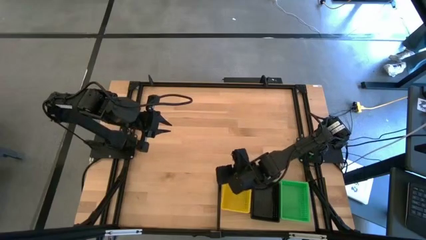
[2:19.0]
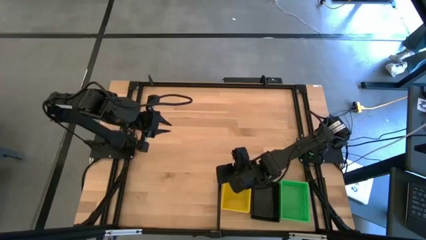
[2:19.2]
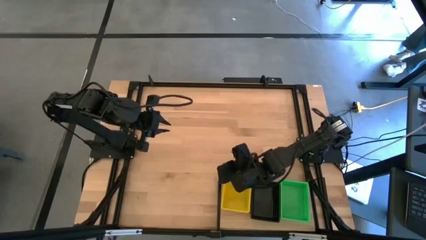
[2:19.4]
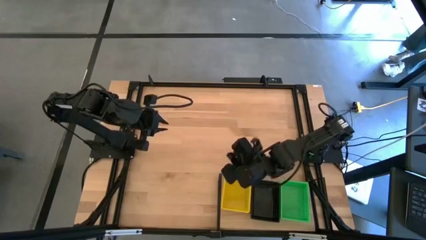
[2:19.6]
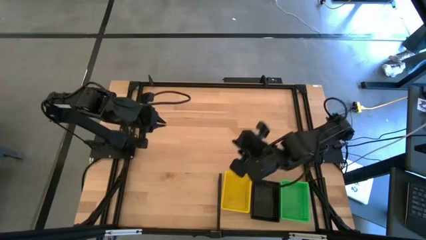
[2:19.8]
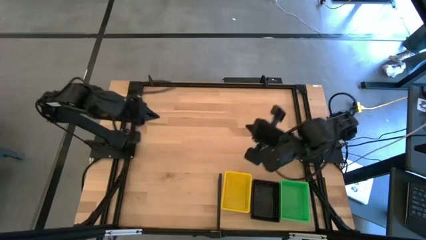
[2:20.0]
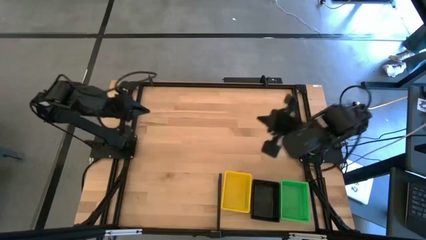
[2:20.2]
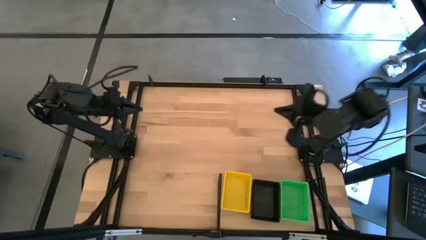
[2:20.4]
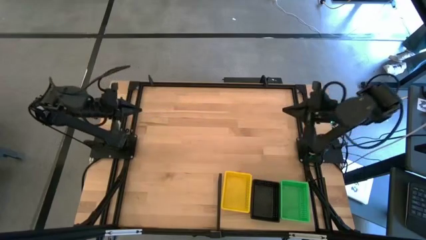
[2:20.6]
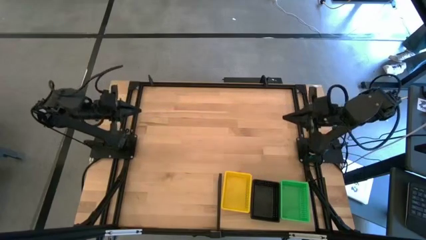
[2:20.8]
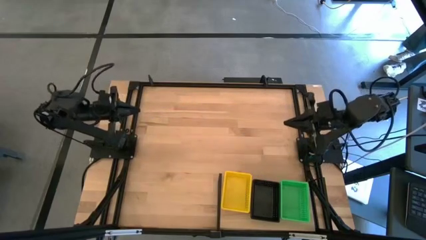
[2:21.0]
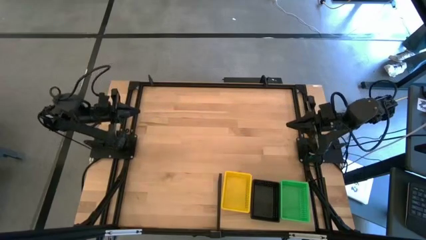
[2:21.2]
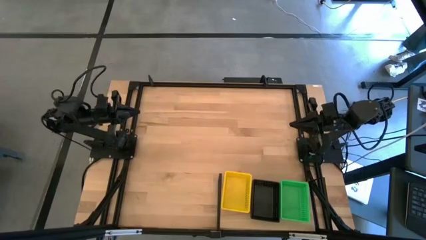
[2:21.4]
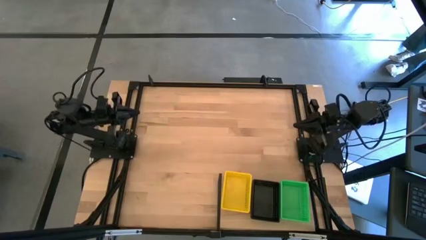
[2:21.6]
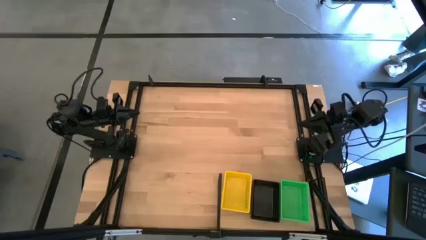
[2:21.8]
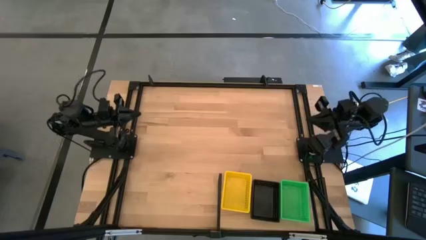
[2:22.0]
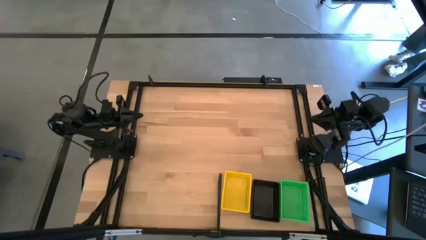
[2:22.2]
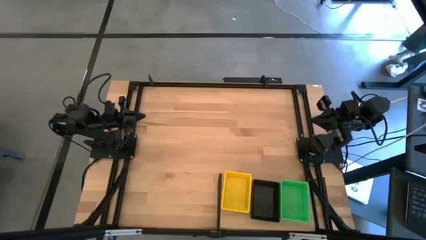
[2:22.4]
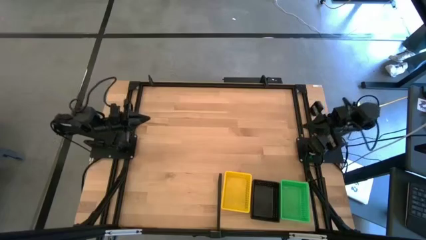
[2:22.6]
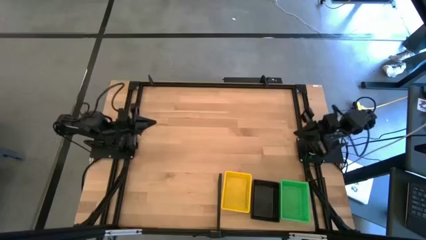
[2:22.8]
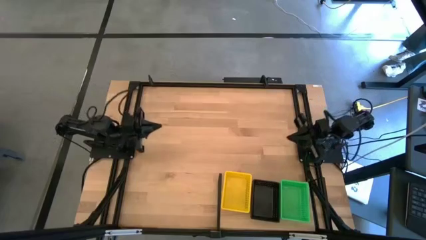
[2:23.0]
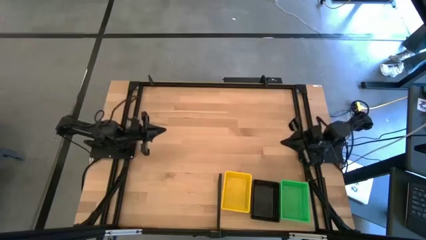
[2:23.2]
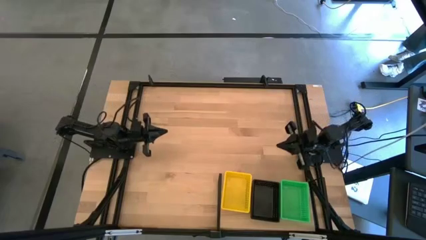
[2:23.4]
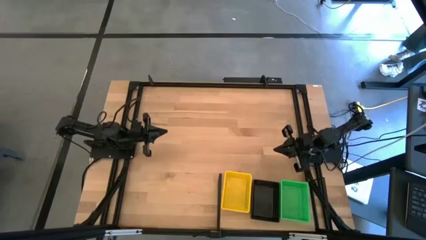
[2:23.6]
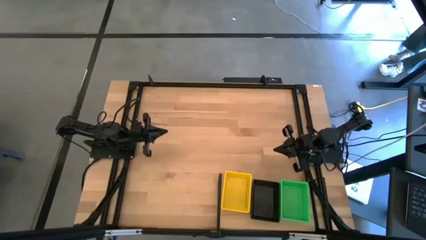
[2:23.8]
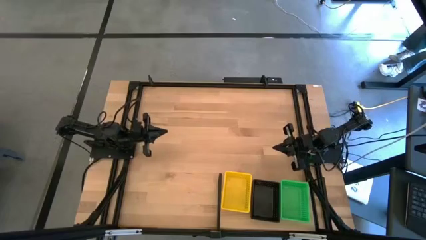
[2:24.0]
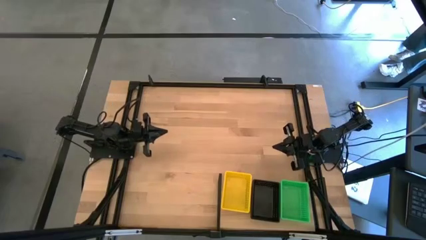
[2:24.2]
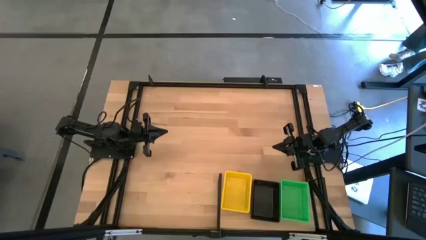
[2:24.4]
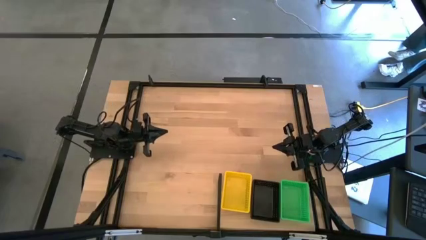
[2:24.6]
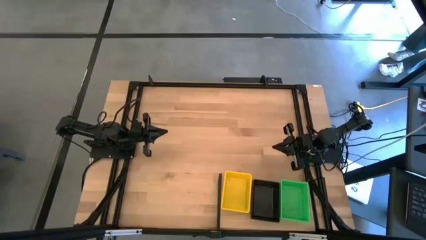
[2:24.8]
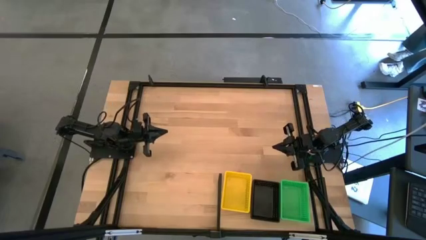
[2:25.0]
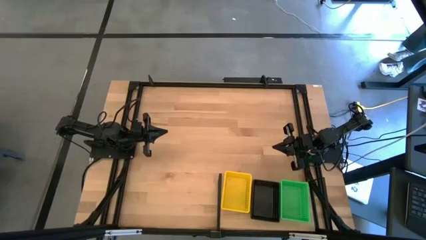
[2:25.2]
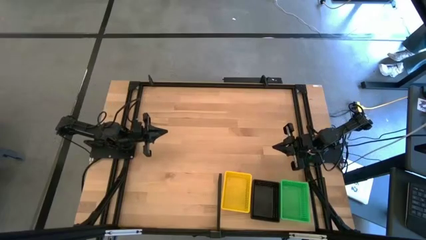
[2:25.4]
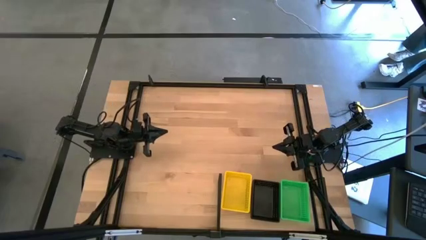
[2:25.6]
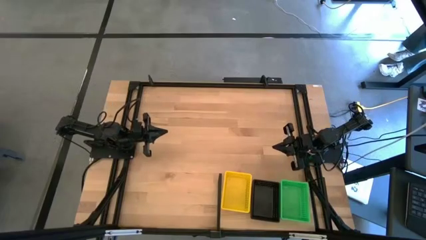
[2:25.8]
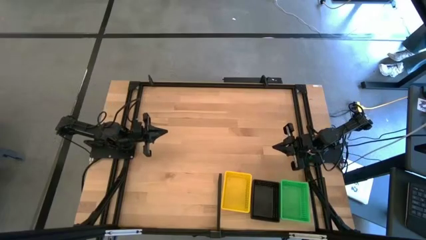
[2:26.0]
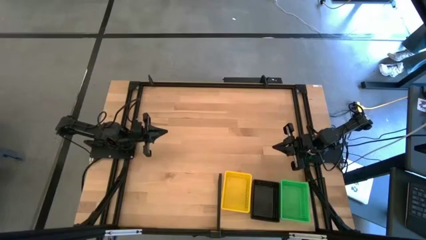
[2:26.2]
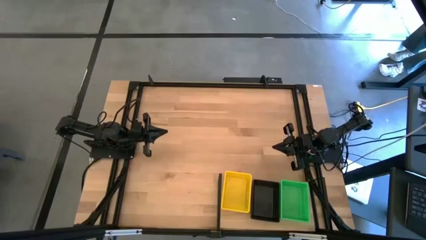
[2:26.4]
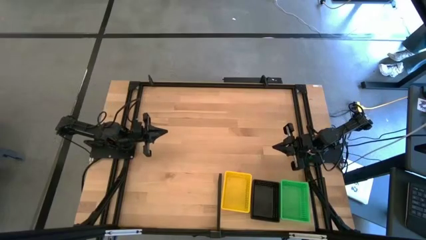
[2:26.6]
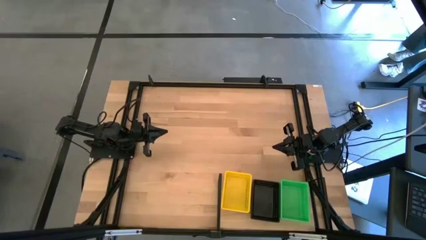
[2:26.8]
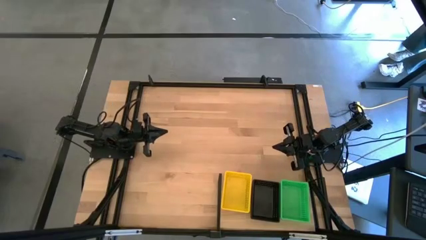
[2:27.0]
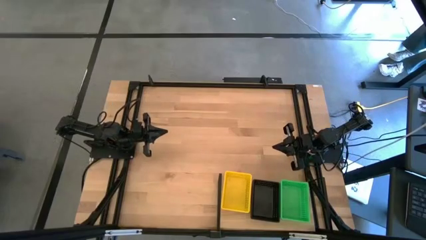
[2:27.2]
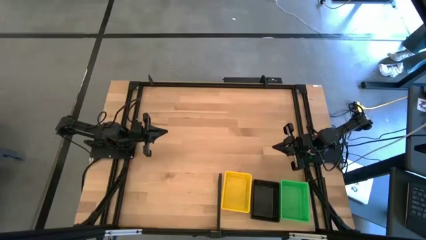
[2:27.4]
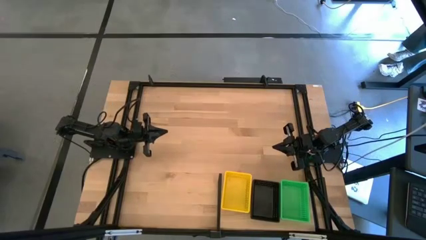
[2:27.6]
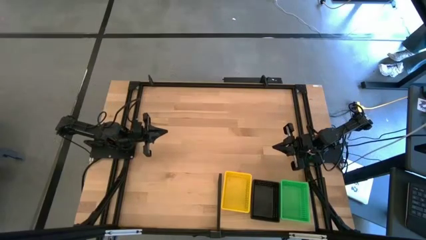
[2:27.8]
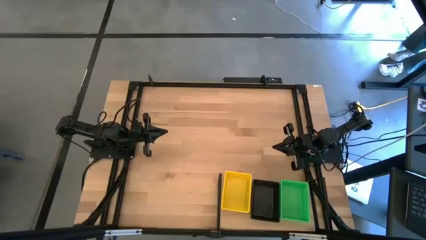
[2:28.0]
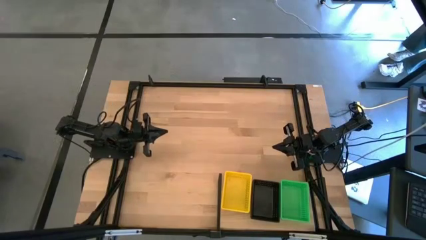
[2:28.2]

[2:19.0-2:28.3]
Task: Stack baskets on shelf by color
Return to Home Position

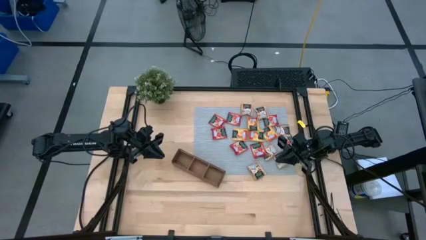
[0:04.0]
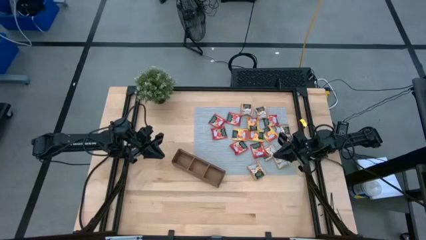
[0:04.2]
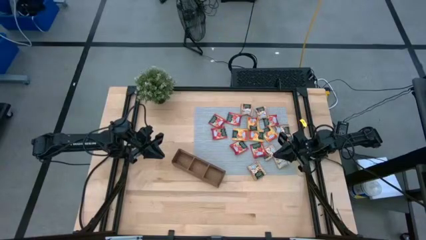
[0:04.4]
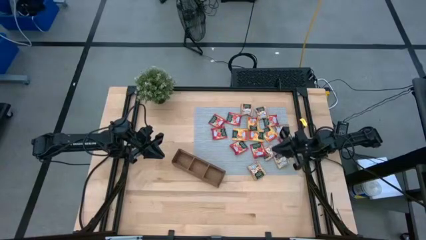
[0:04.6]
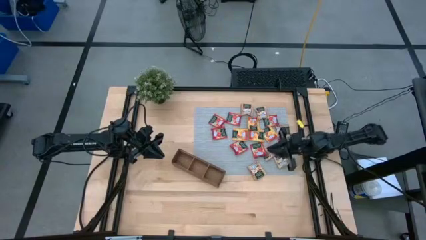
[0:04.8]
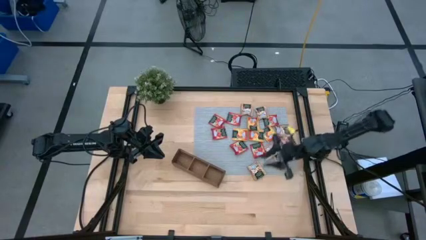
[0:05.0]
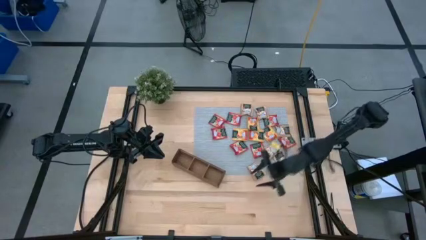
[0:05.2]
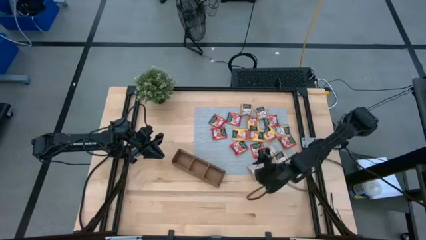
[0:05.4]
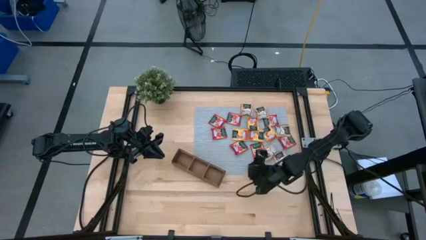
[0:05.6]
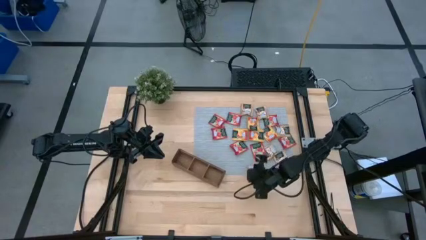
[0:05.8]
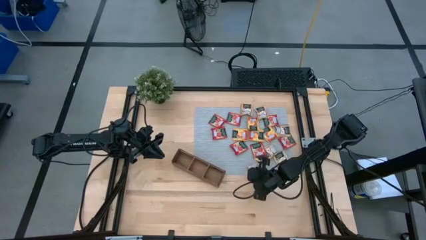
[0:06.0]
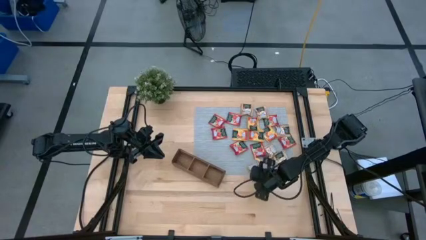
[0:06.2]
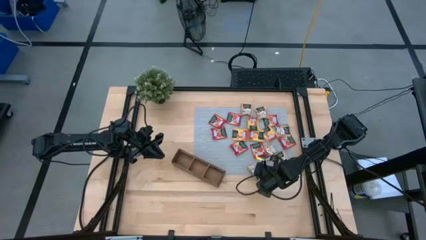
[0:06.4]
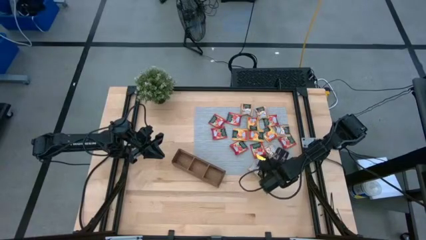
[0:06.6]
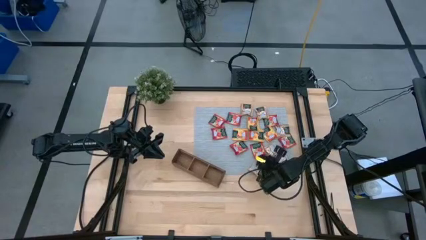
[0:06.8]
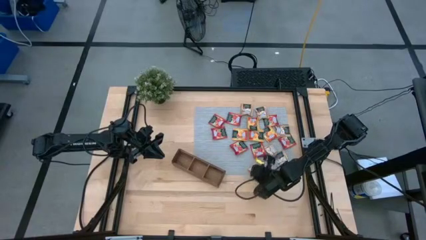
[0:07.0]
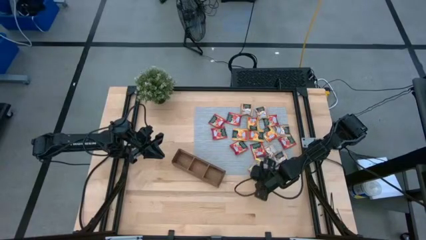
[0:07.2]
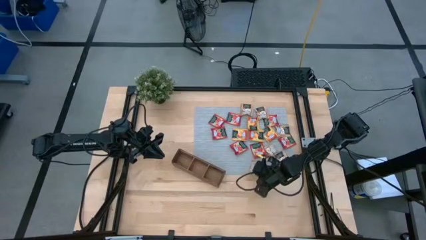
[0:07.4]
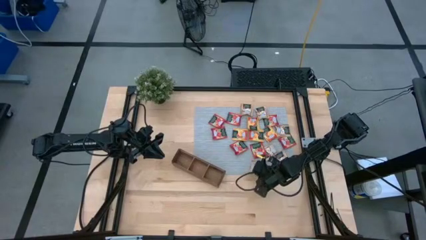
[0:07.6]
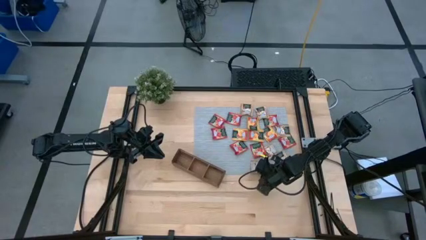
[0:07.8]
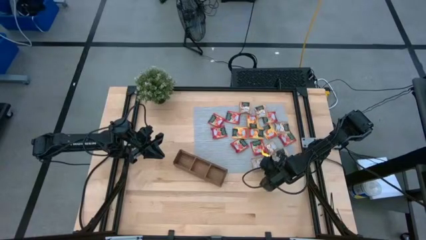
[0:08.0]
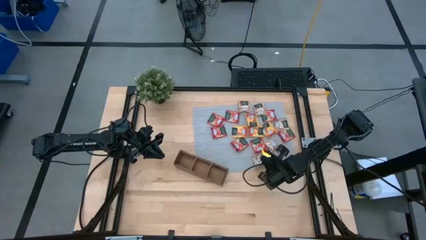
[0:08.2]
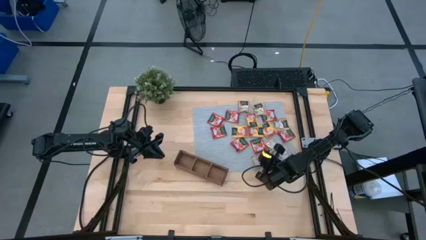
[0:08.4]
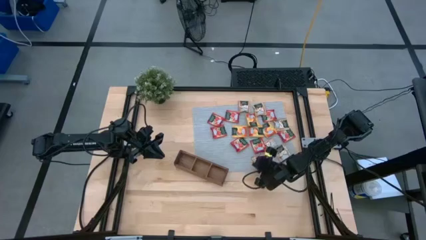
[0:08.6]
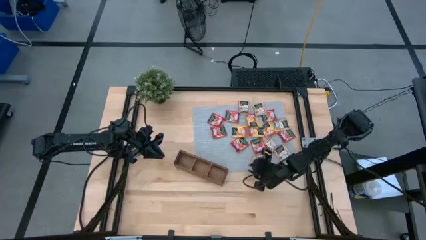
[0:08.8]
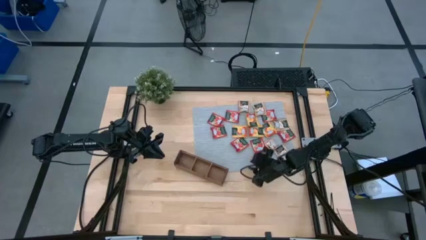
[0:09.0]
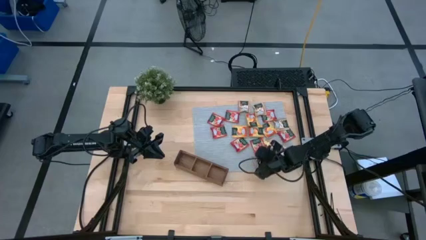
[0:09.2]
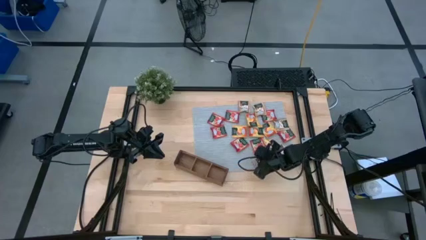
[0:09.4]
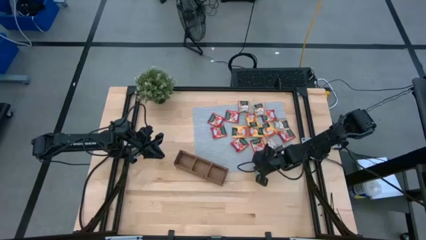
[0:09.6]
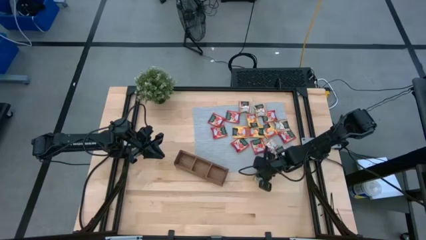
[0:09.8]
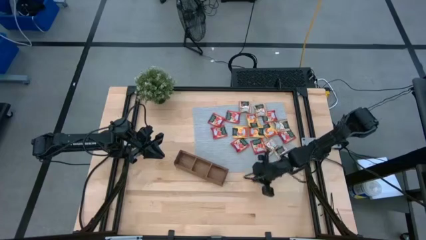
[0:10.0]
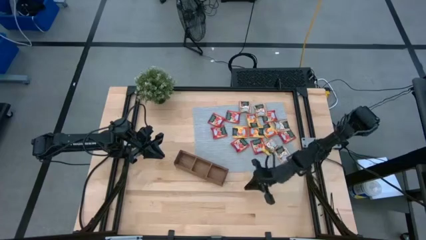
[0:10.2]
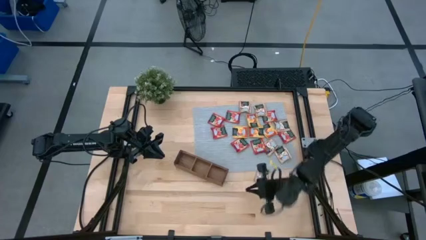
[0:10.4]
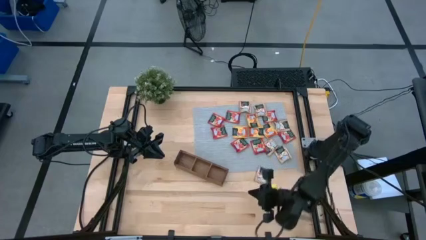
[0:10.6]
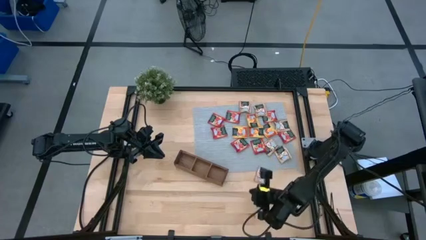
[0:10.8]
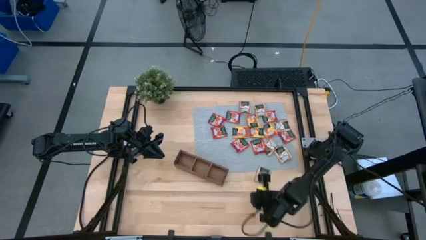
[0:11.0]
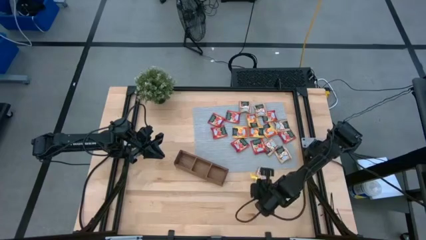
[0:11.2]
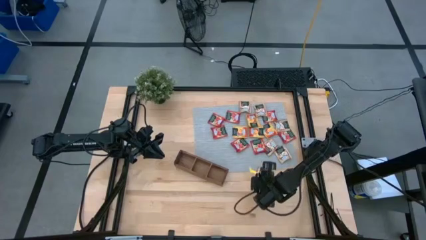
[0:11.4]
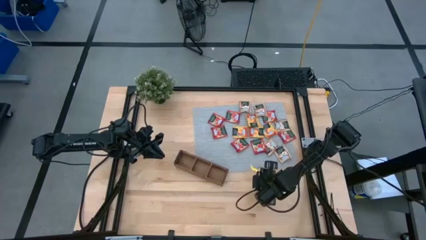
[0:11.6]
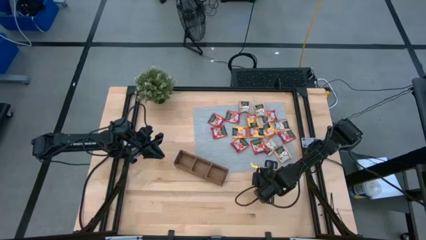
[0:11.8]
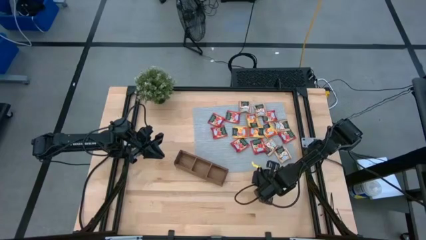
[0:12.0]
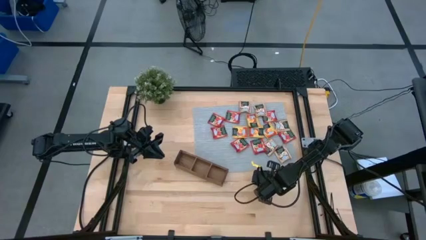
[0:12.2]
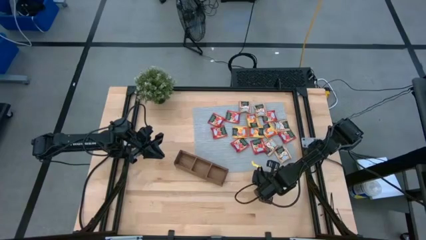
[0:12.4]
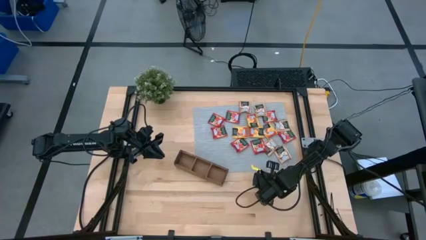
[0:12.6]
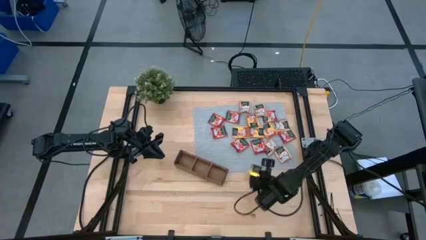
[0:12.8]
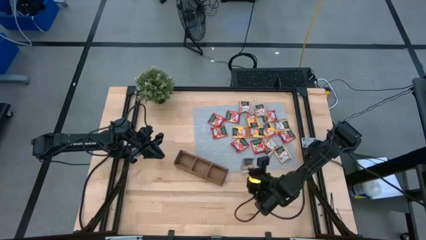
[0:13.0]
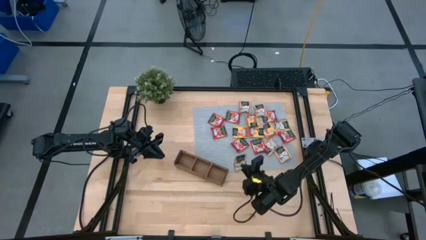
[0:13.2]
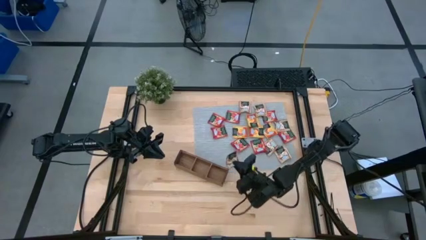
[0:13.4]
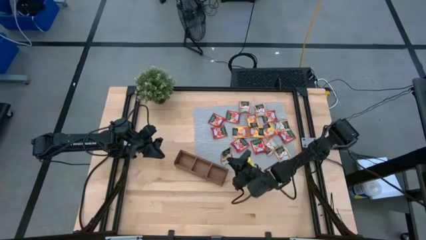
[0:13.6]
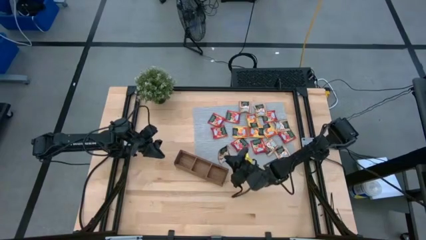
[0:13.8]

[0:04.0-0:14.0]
Task: Pick & Place Tea
Put the brown tea bag into the left section of the wooden organizer
